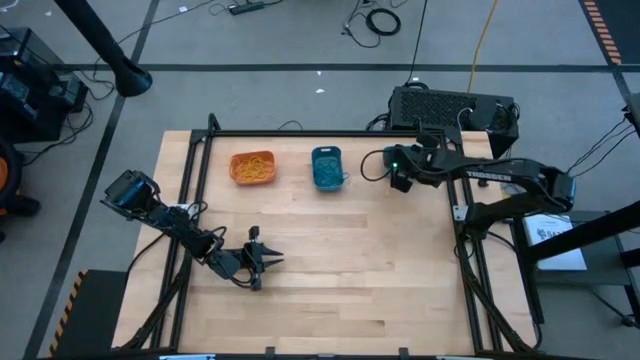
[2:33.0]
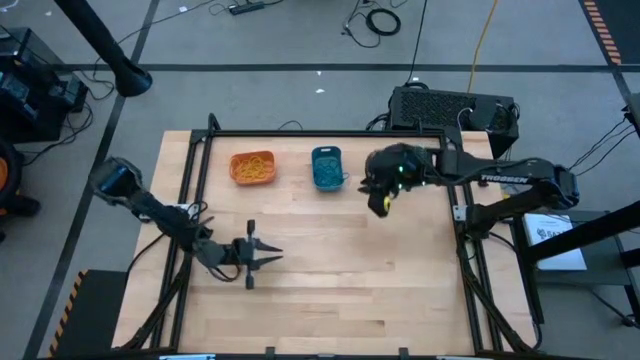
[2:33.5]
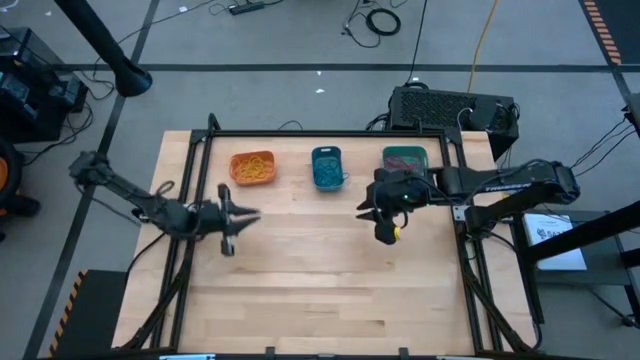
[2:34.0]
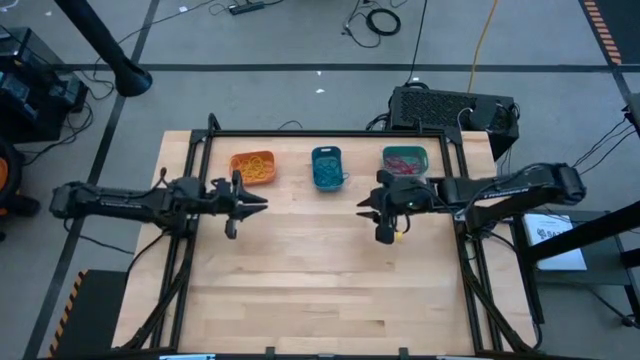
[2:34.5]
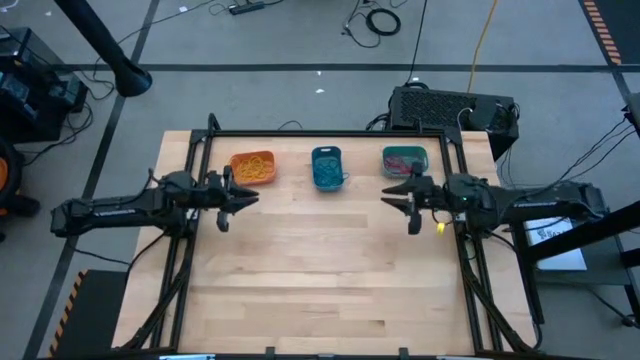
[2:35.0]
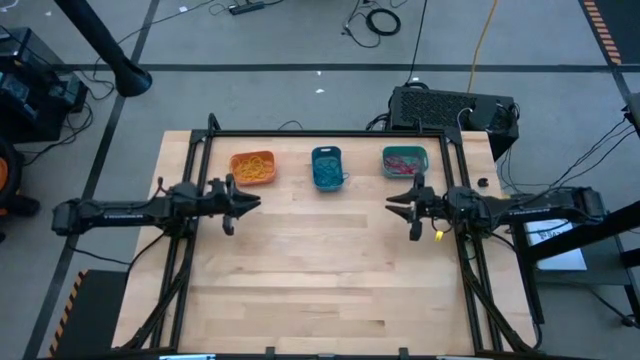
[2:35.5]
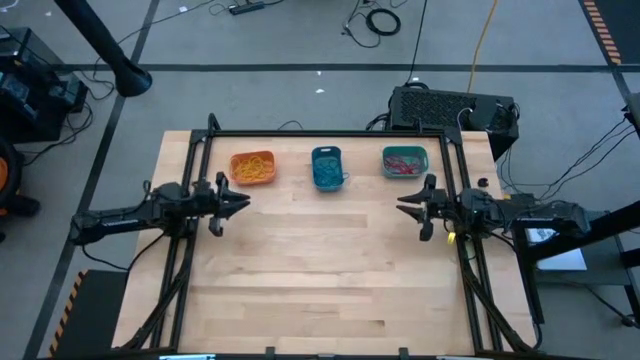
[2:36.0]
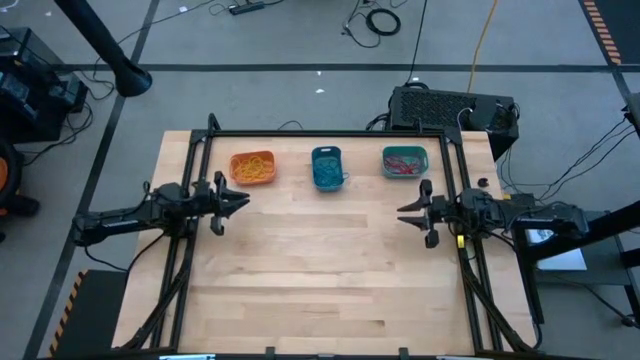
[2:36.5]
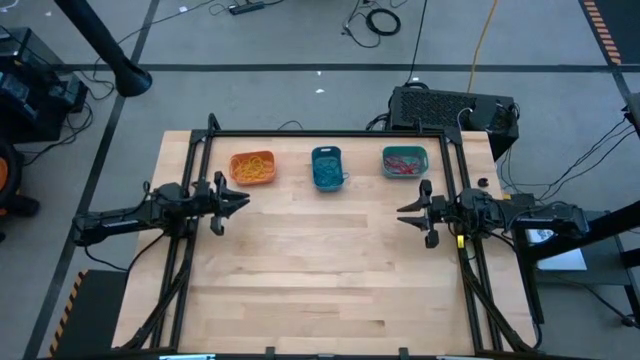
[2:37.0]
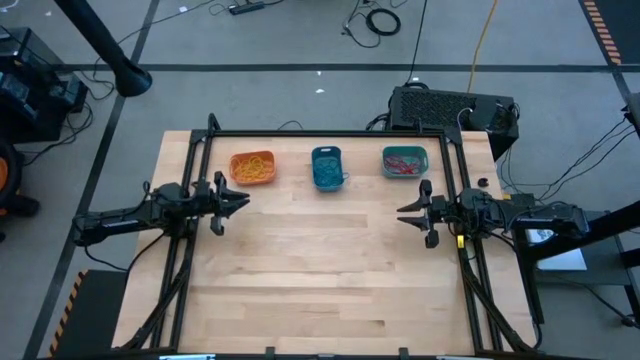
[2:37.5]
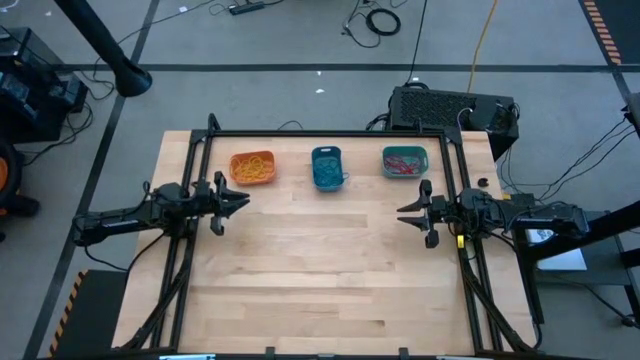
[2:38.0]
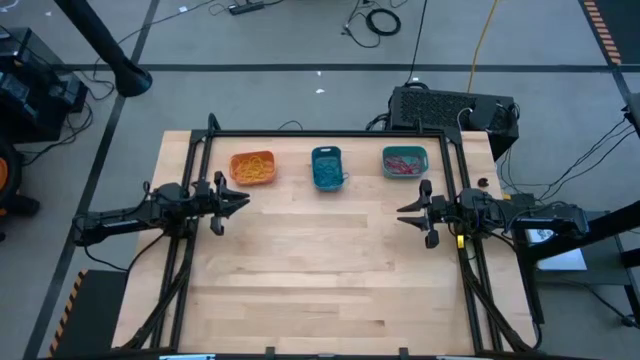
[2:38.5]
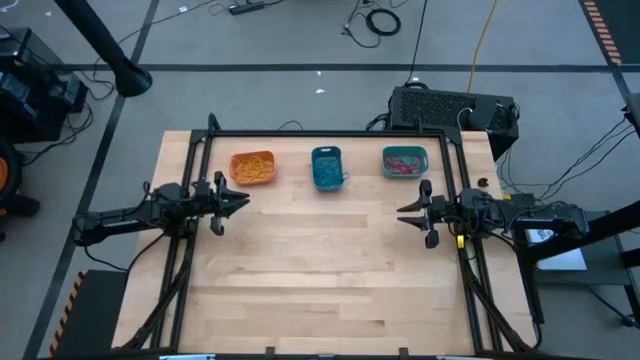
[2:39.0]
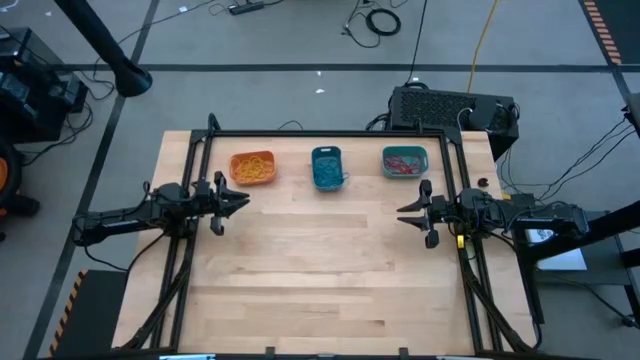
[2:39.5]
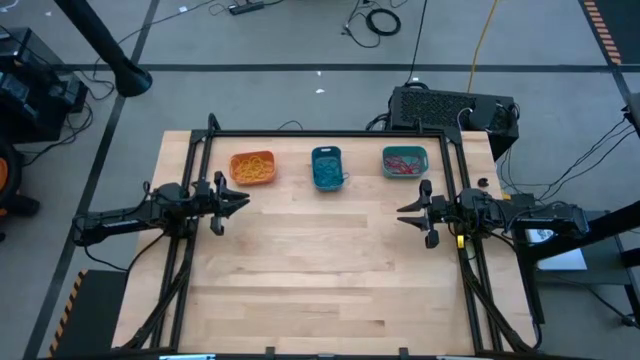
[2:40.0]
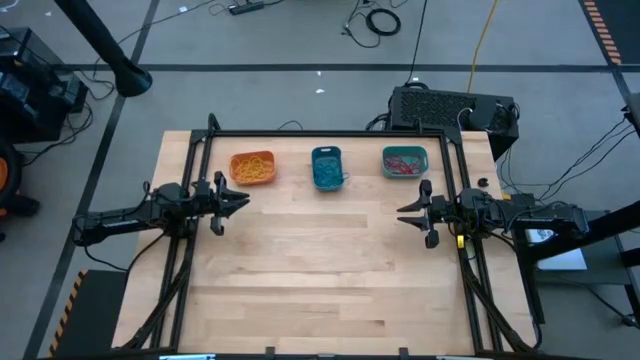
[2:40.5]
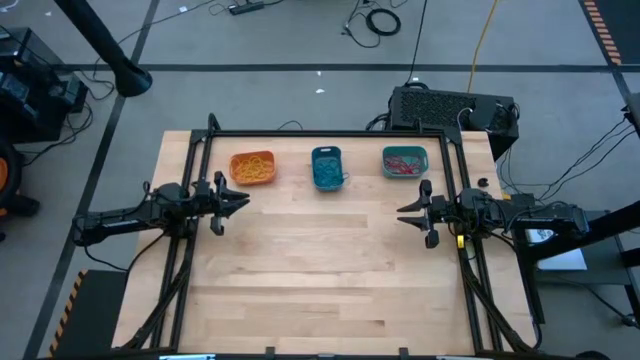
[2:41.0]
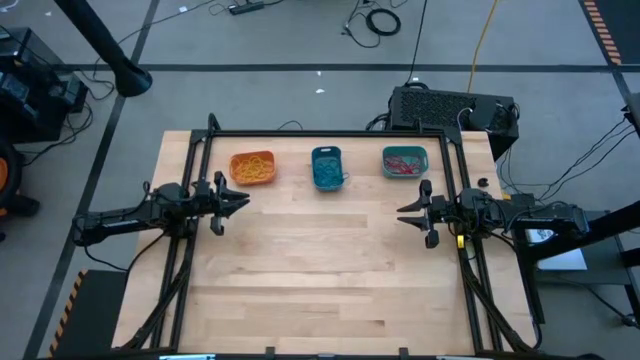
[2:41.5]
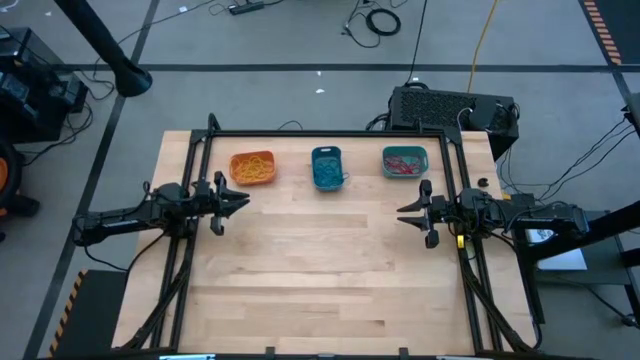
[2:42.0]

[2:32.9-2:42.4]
Task: Sort rubber bands into baskets
Return to Home Position

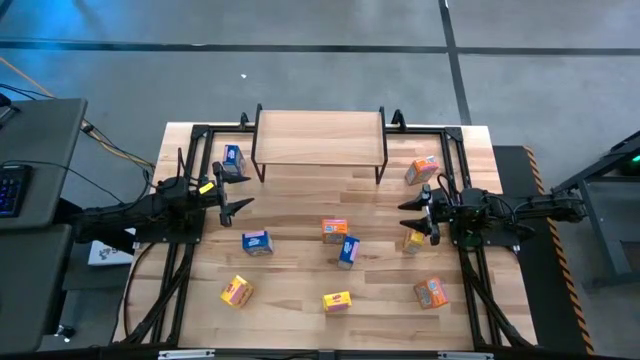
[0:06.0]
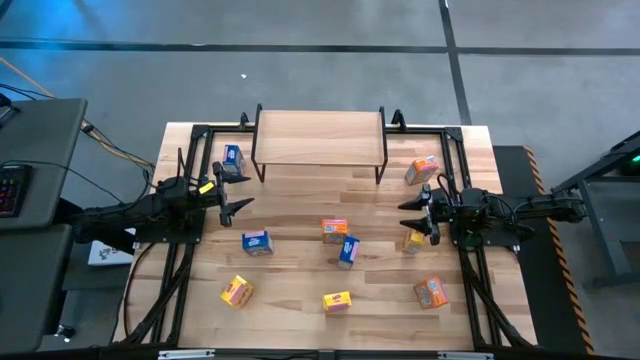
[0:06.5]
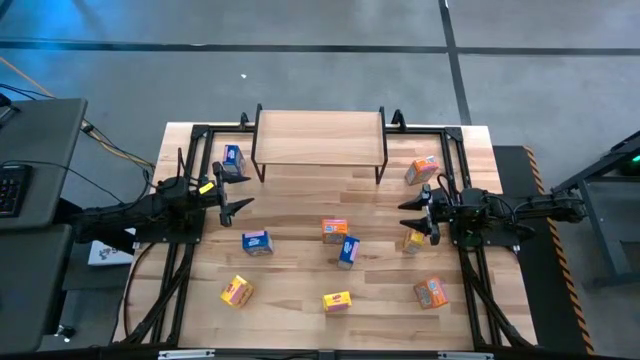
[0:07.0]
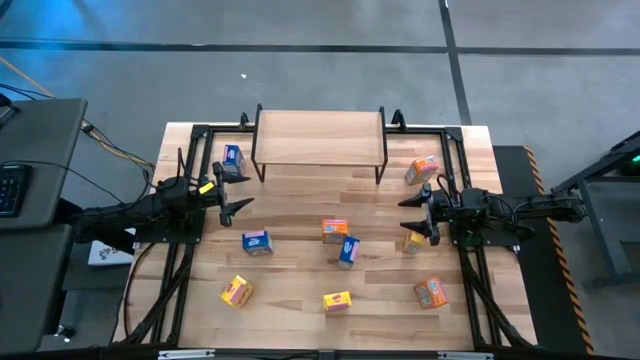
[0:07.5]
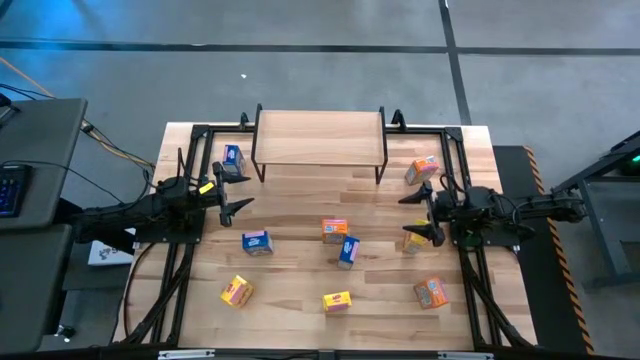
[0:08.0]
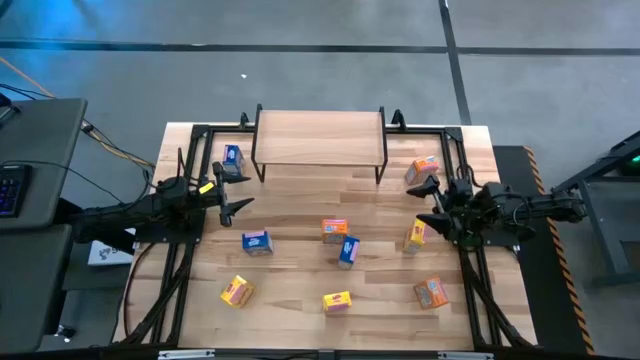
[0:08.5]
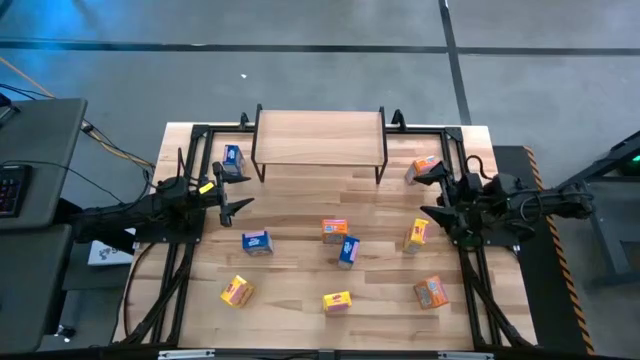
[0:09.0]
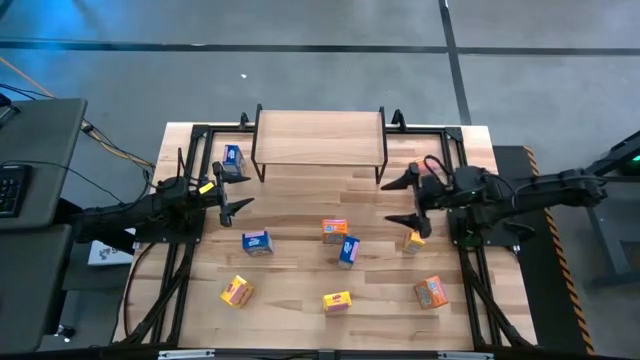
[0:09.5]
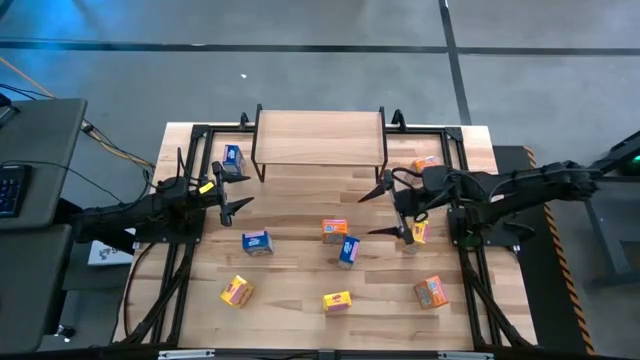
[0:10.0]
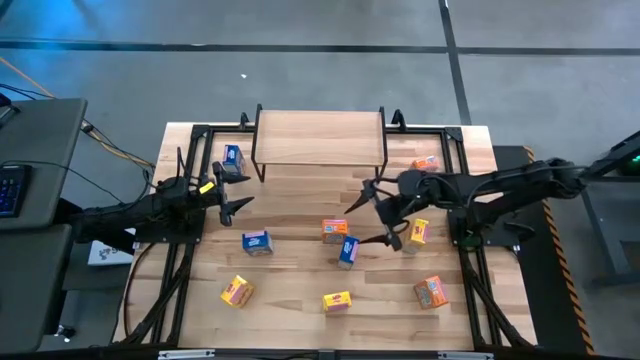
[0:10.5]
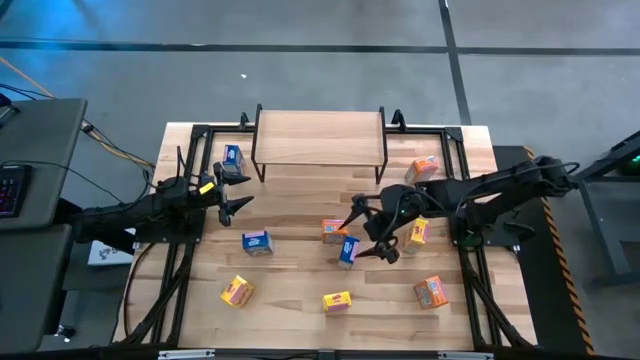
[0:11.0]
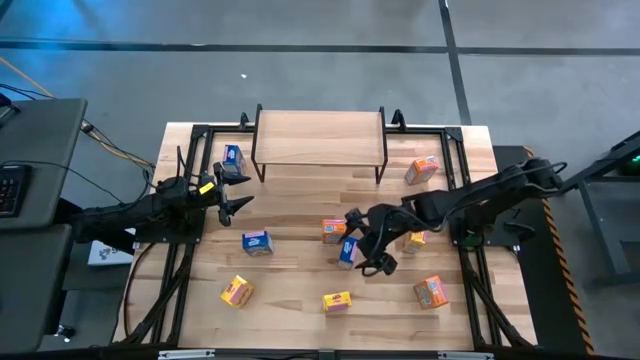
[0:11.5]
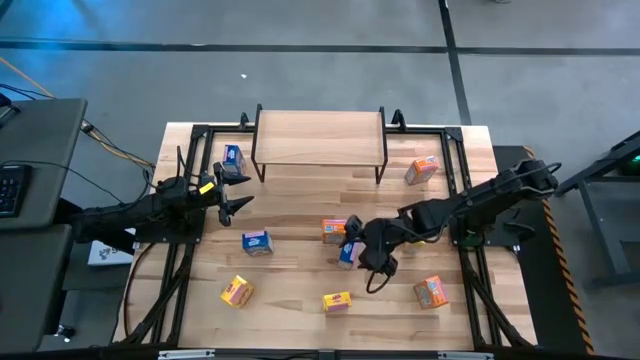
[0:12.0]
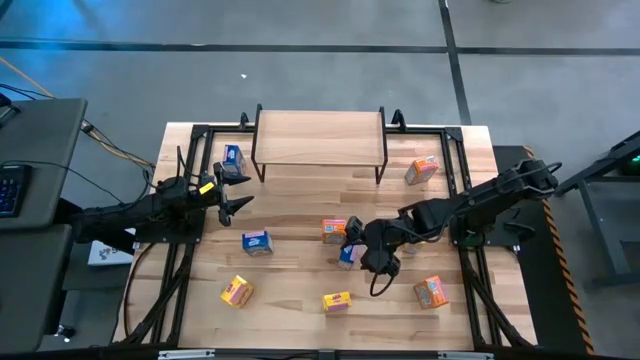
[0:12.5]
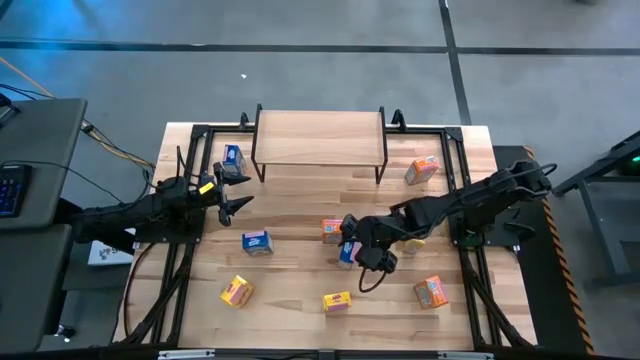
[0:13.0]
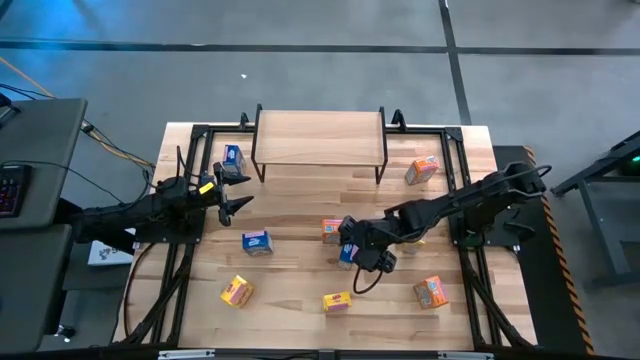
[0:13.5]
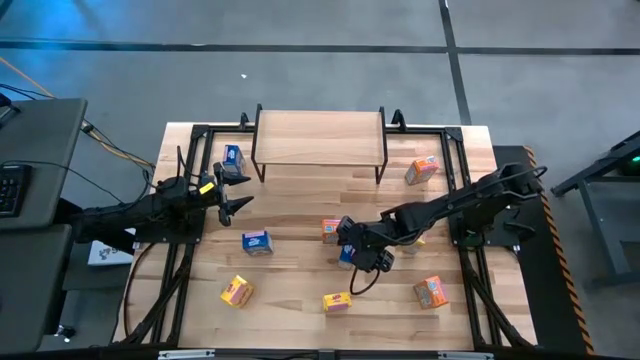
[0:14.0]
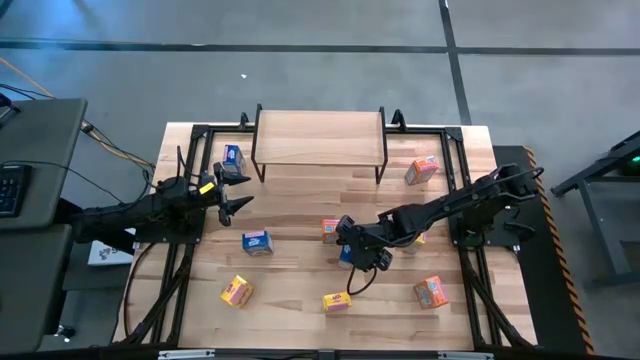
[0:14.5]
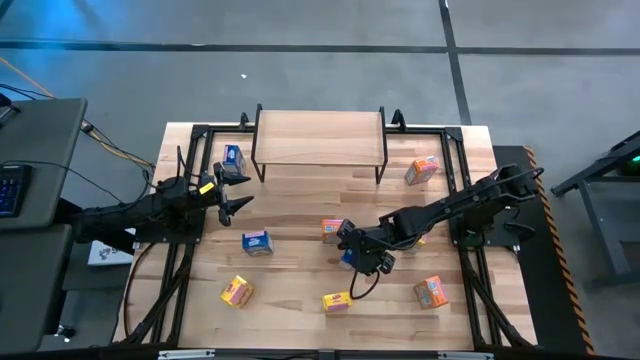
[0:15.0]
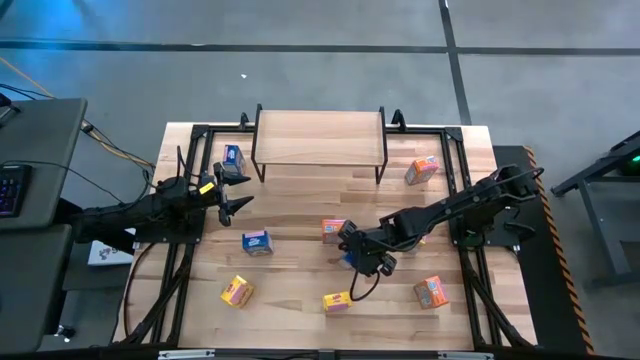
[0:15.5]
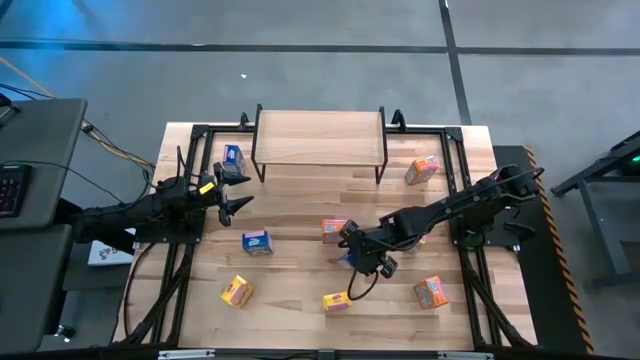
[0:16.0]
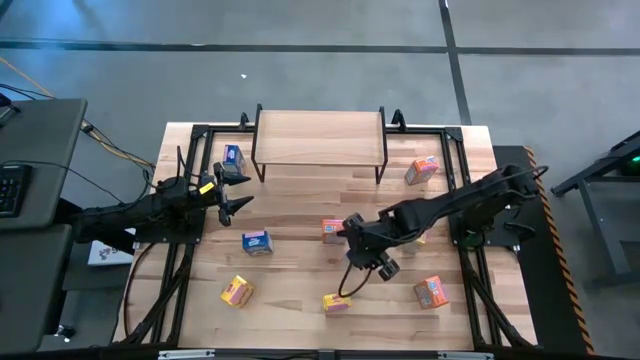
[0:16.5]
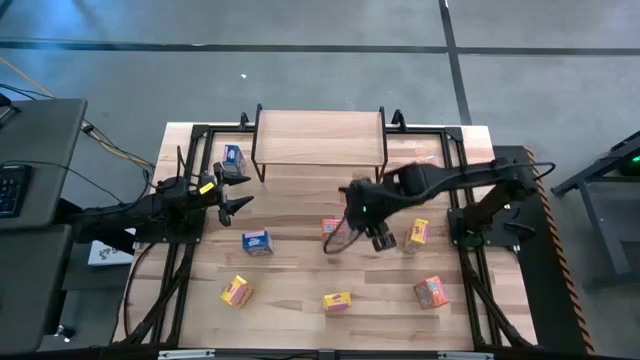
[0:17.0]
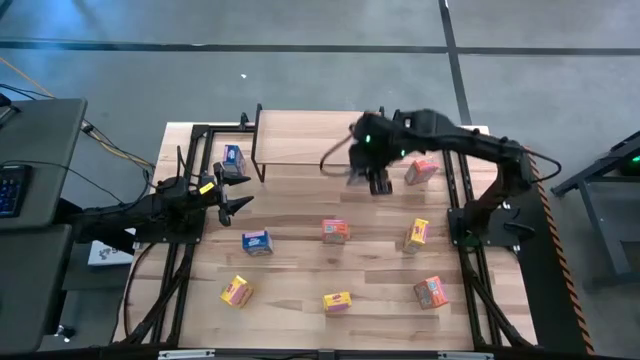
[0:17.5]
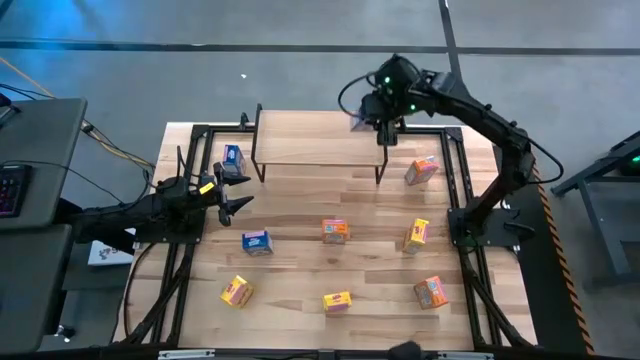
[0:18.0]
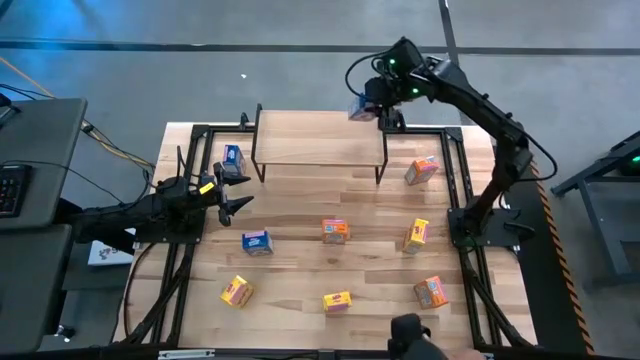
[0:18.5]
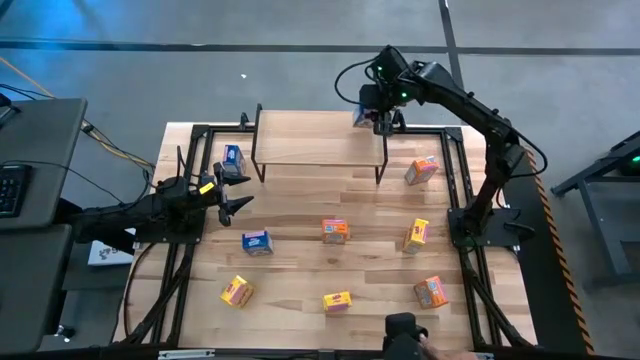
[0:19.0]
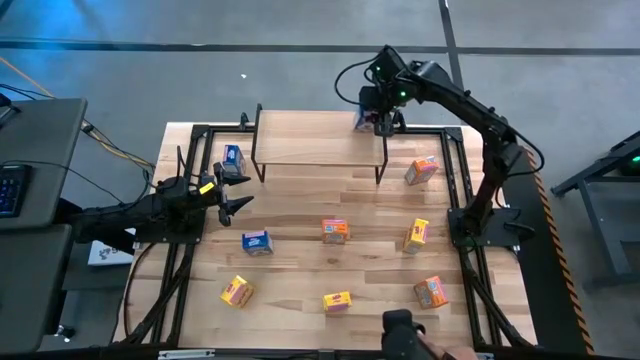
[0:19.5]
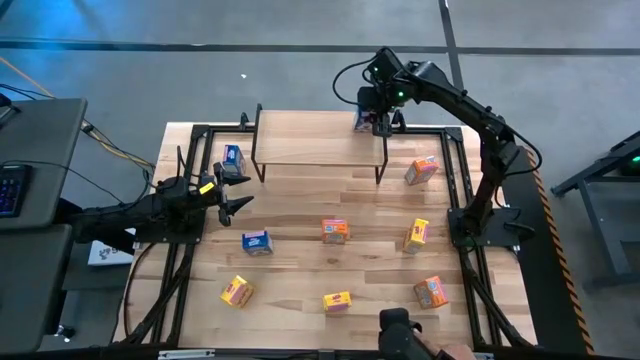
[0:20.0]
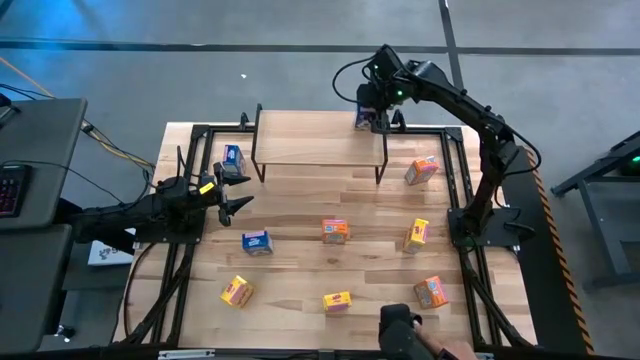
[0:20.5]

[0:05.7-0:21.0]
Task: Stack cereal on shelf
Put the right blue cereal box on the shelf
